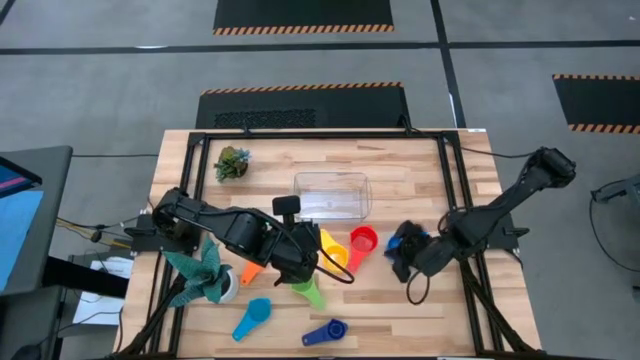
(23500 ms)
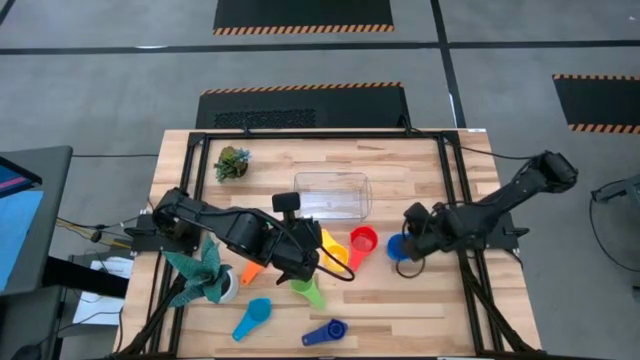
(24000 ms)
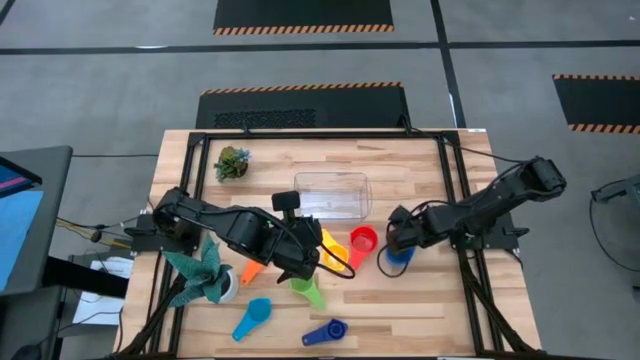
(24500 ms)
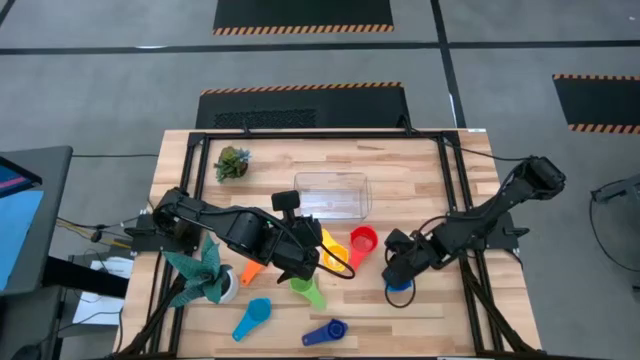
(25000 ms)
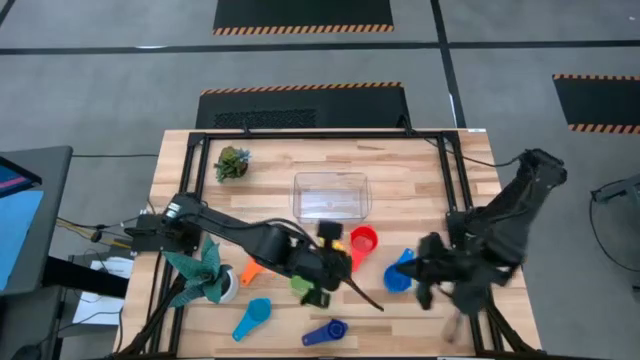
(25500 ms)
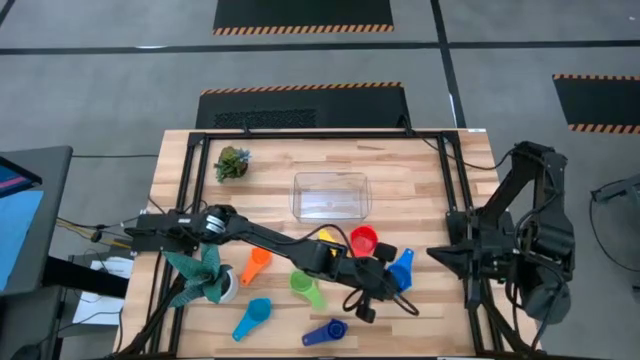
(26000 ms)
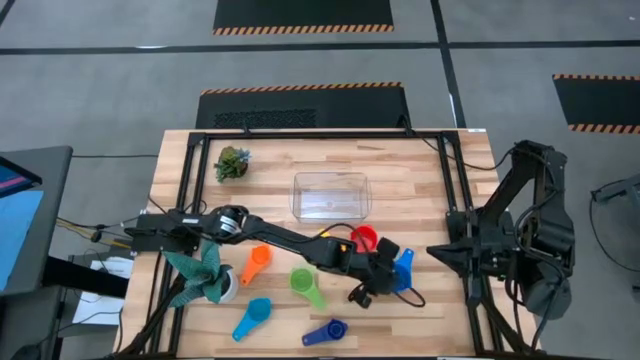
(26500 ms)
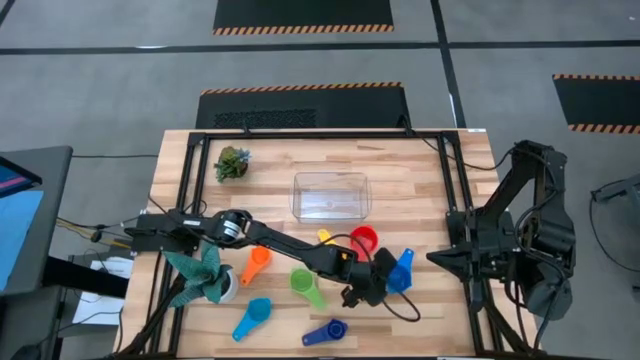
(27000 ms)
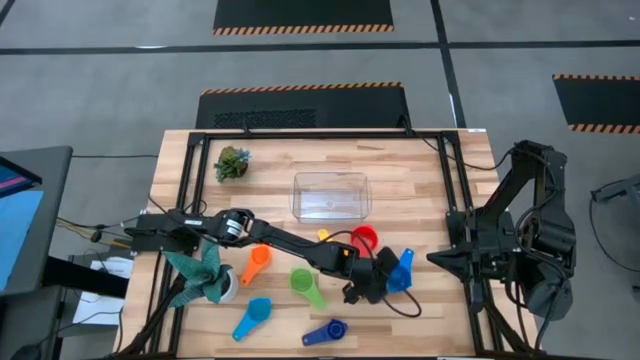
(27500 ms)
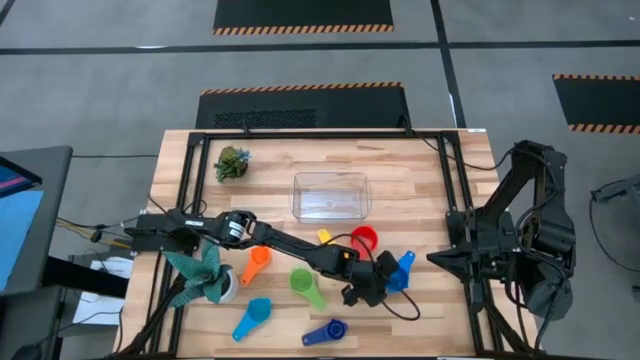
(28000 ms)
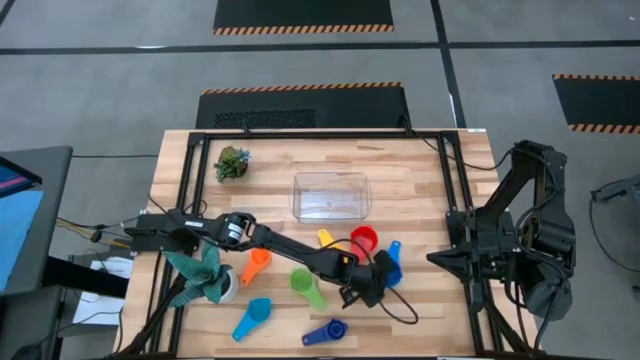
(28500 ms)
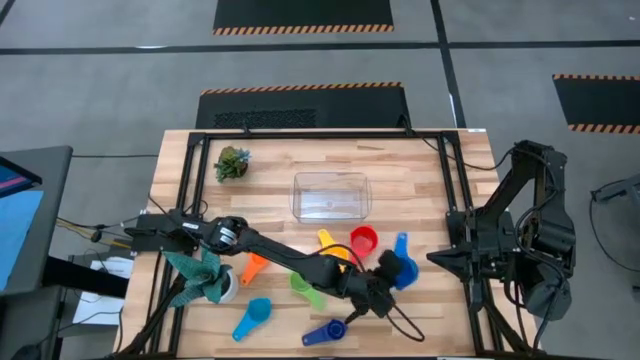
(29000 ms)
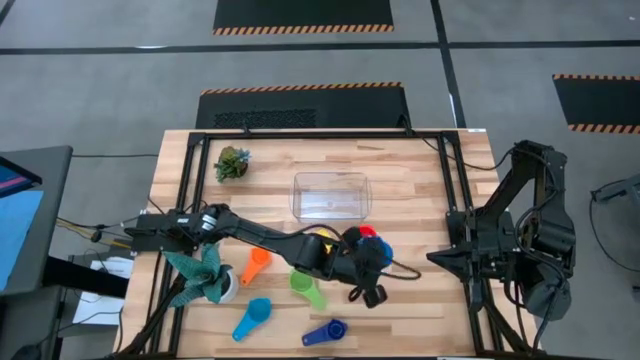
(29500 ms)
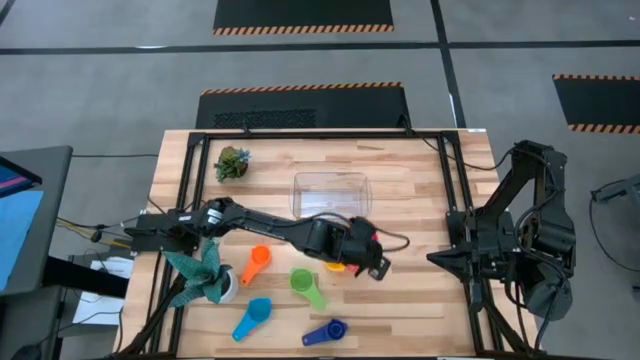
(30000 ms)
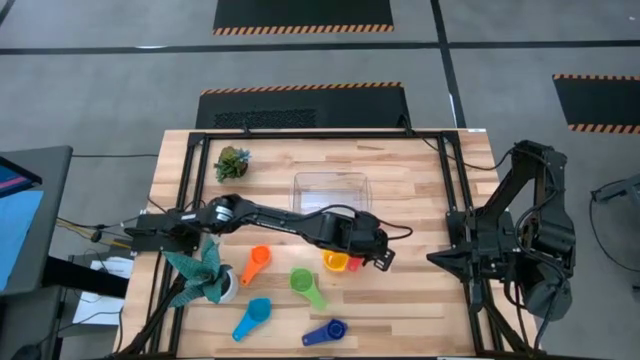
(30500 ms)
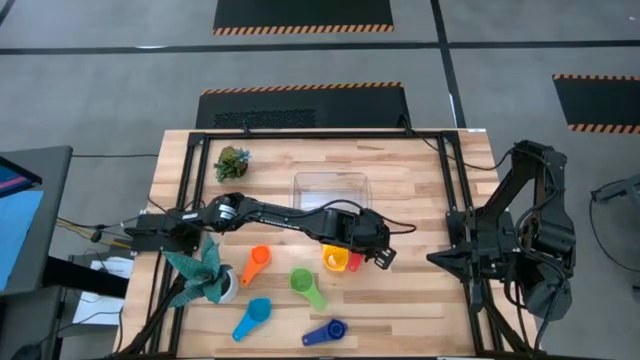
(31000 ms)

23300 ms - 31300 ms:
Task: Nest measuring cups in basket
Stack the blue measuring cup on top of the red measuring cup

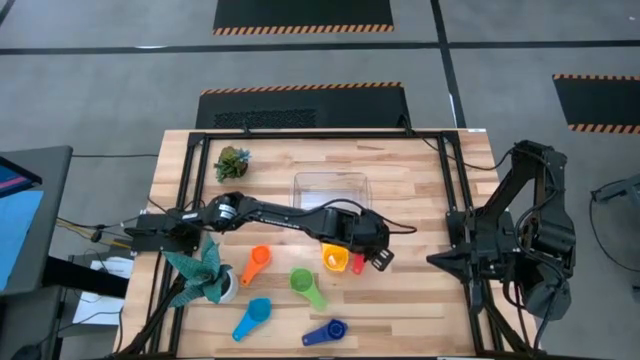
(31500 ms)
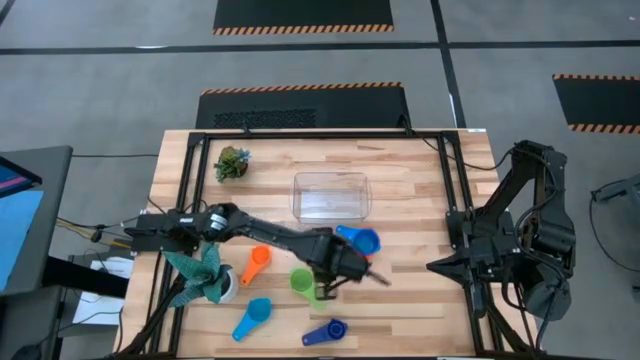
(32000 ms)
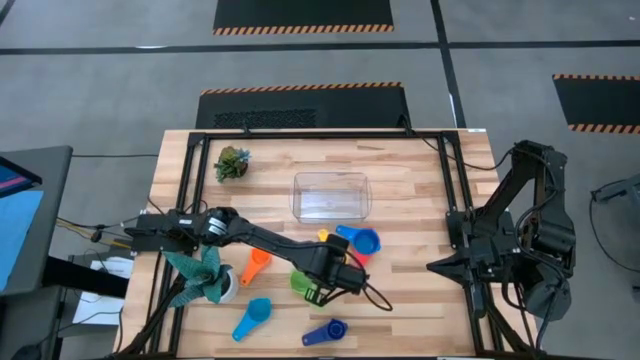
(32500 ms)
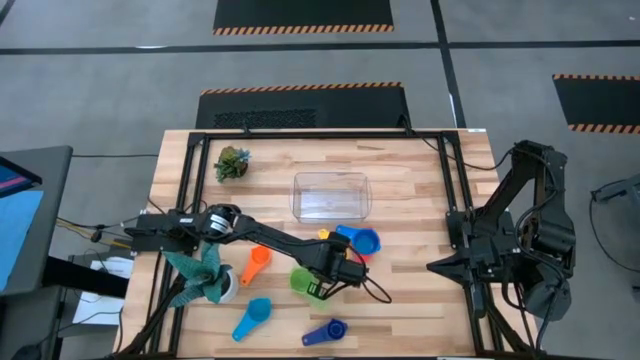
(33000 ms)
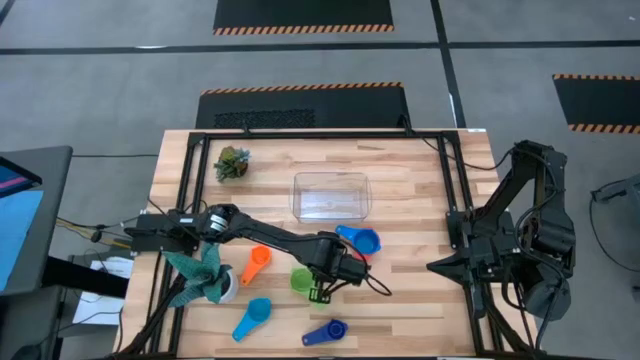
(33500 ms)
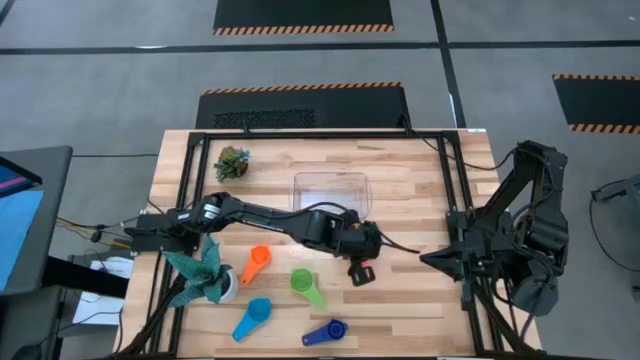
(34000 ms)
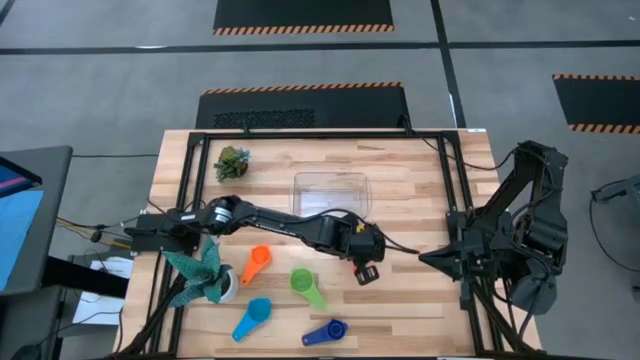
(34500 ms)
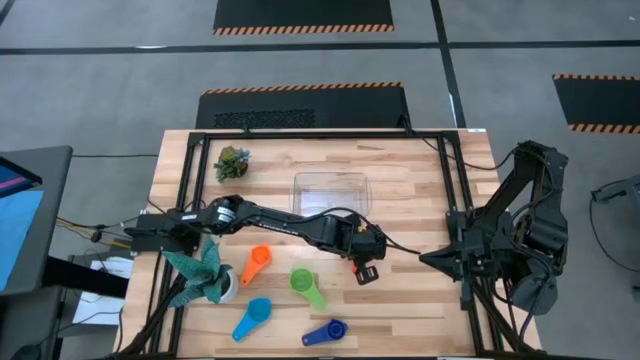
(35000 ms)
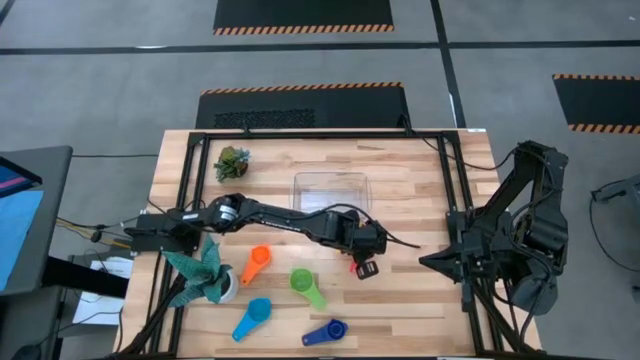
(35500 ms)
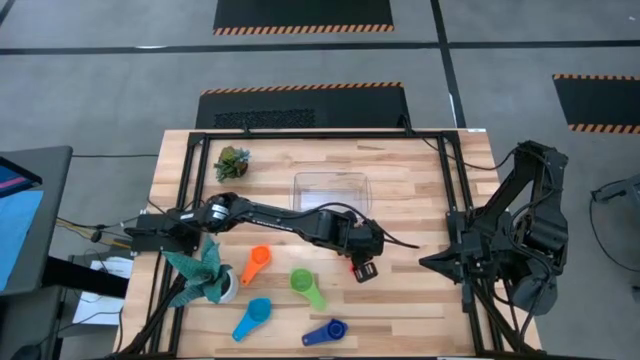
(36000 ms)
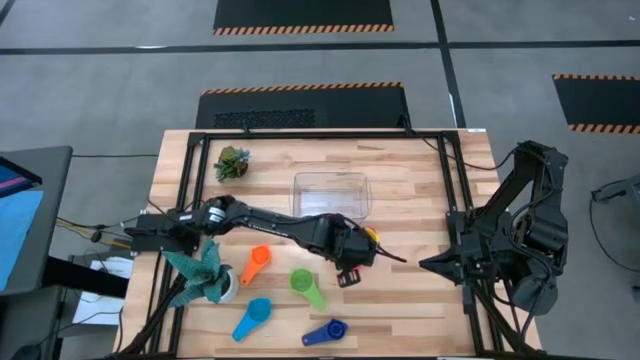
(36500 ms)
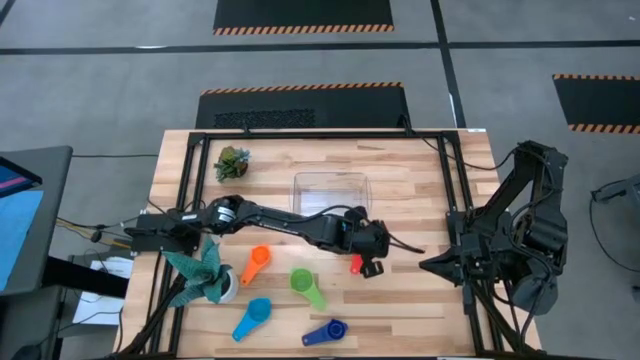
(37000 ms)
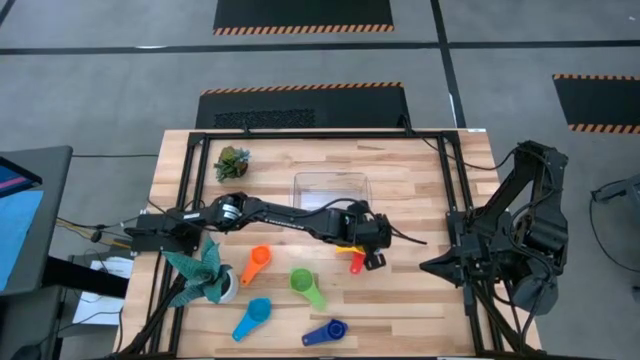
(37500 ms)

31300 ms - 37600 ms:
Stack the yellow measuring cup on top of the blue measuring cup

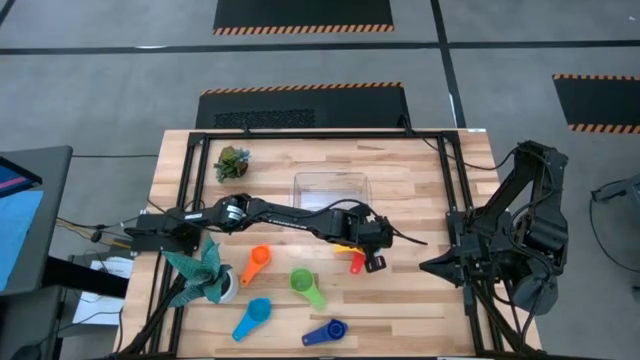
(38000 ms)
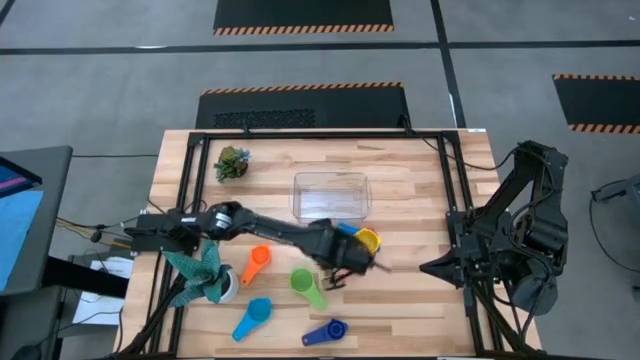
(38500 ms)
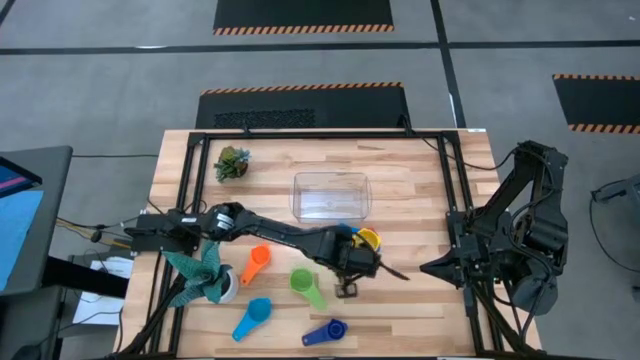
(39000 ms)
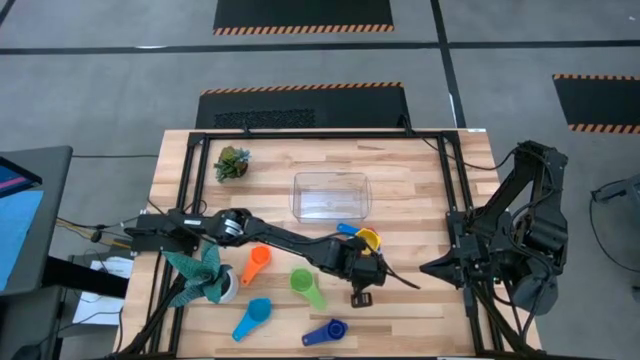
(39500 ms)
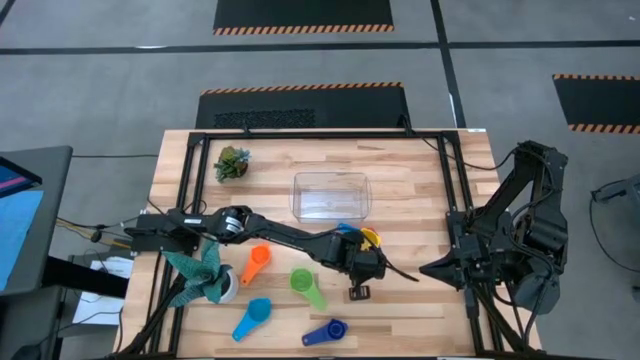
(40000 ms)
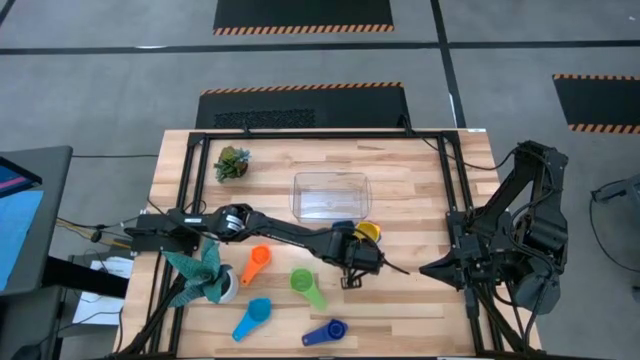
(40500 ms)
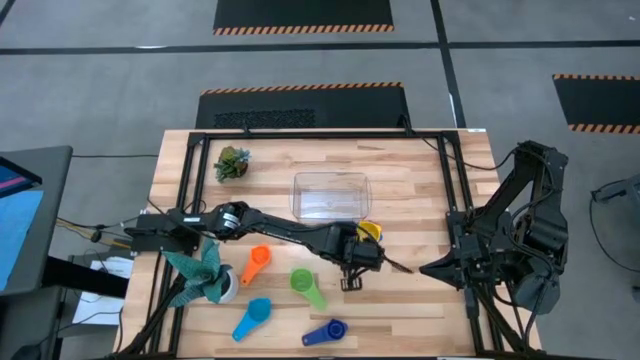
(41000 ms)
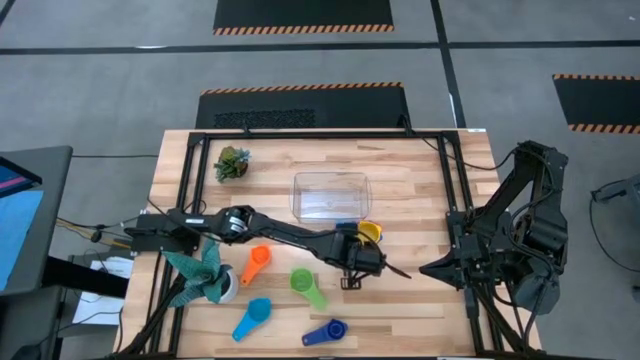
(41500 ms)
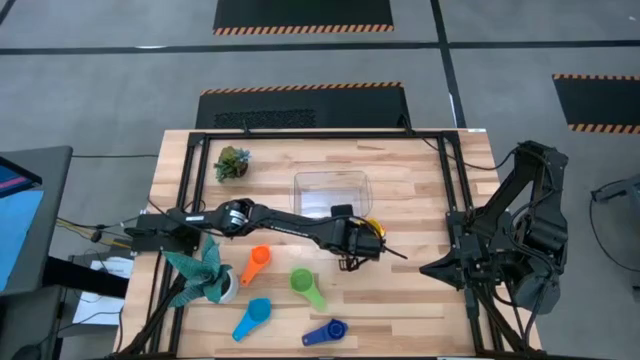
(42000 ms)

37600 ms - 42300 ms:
Adjust the stacked measuring cups on the table
